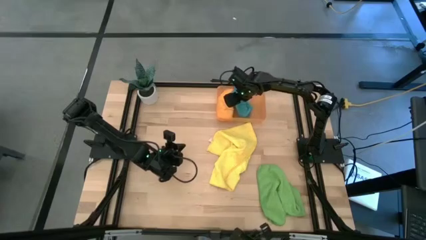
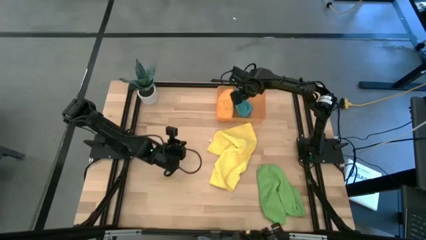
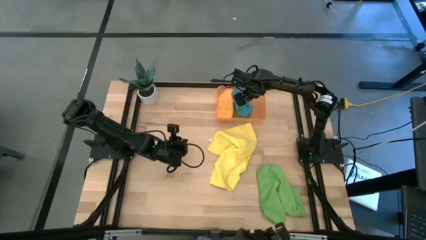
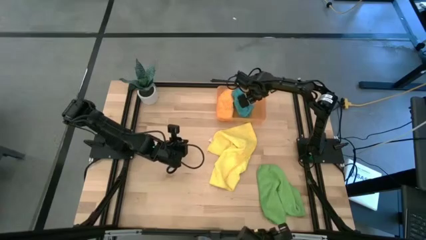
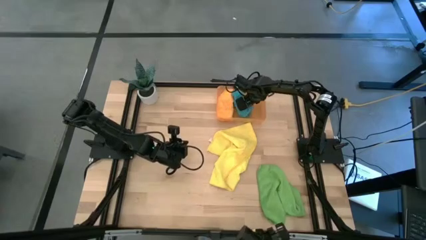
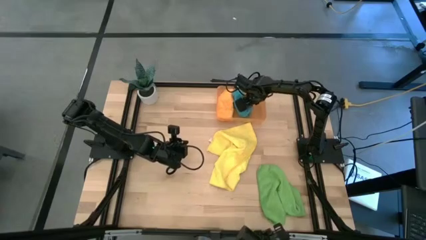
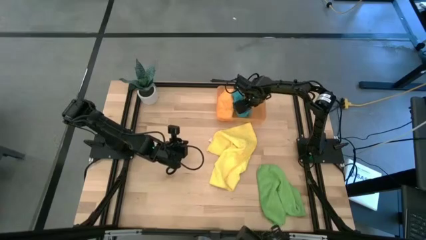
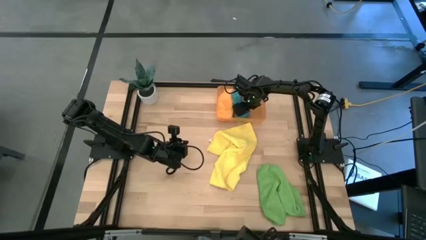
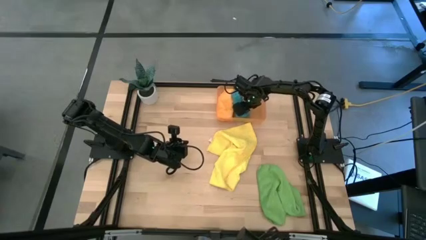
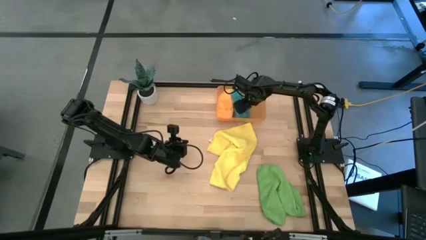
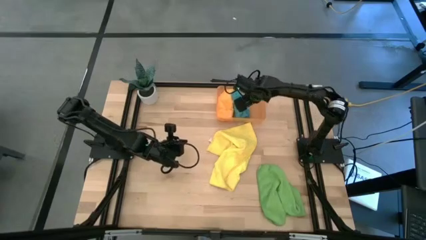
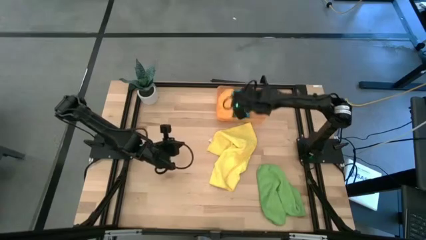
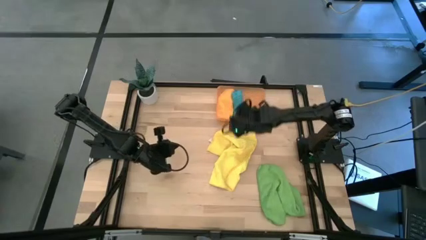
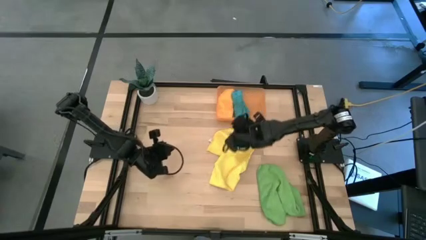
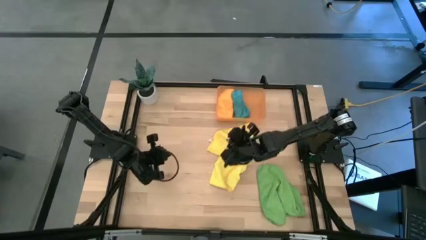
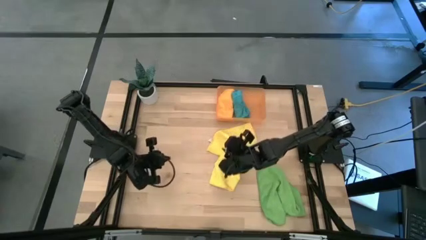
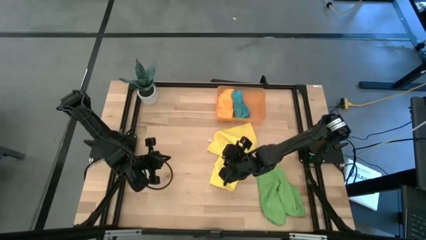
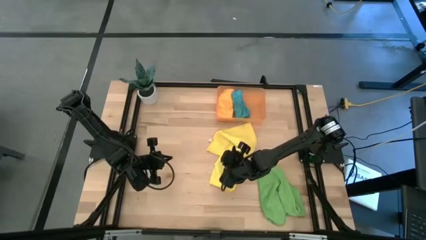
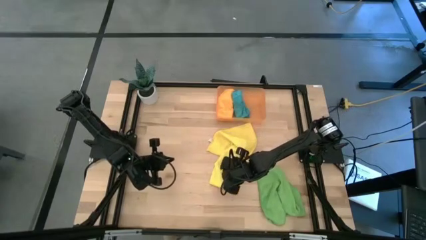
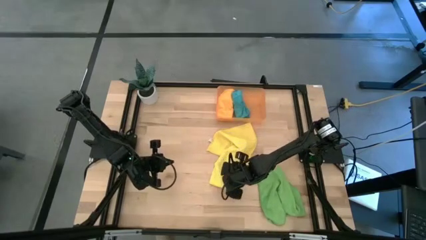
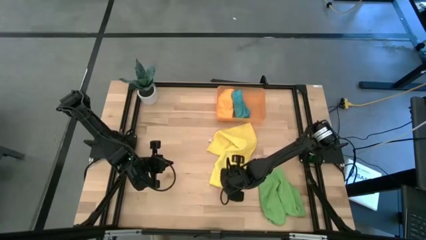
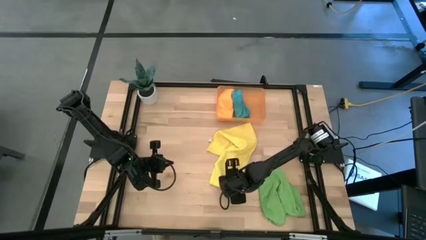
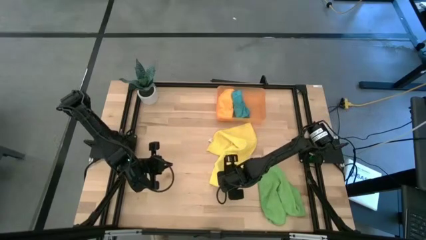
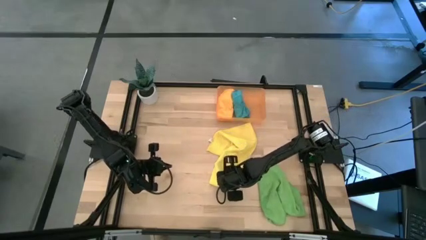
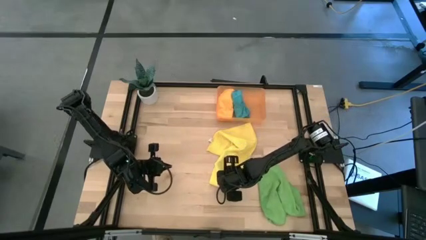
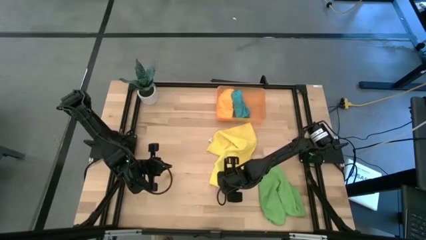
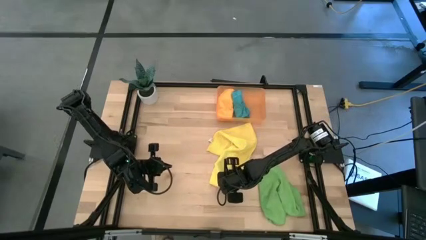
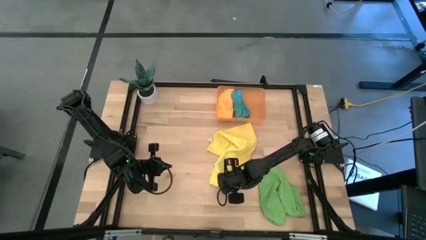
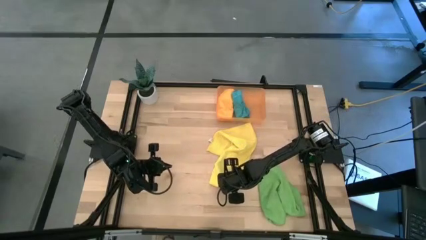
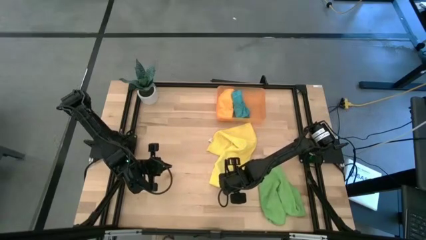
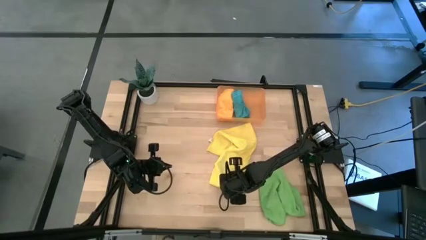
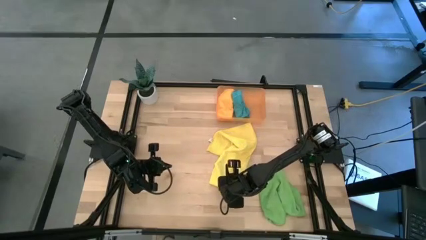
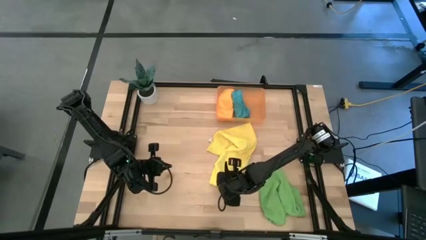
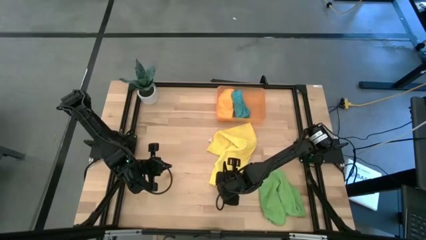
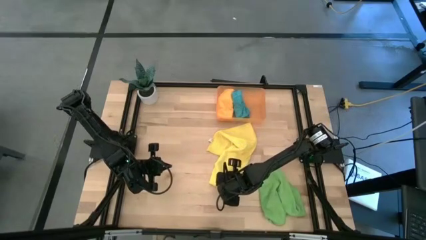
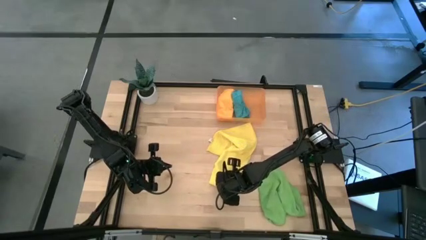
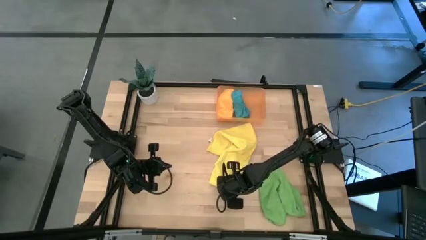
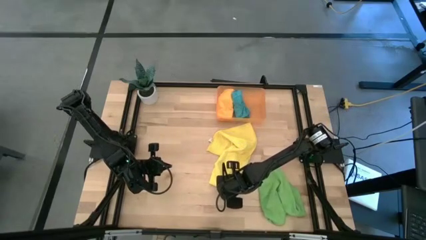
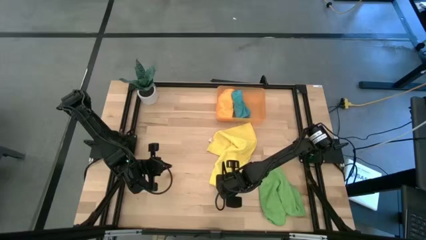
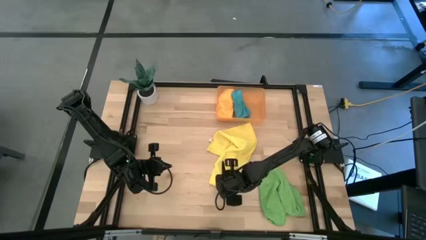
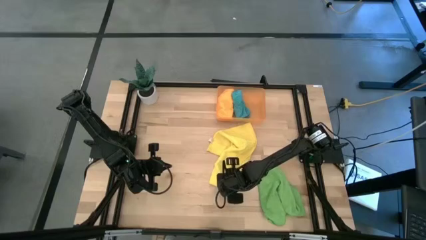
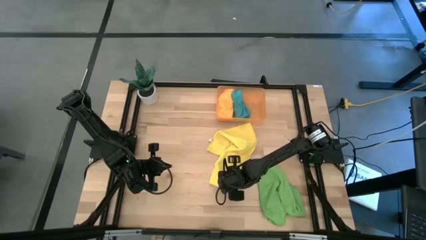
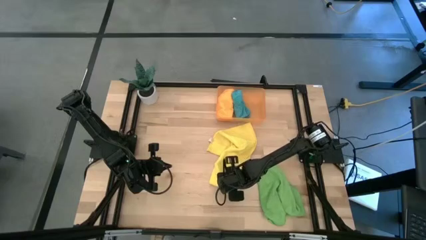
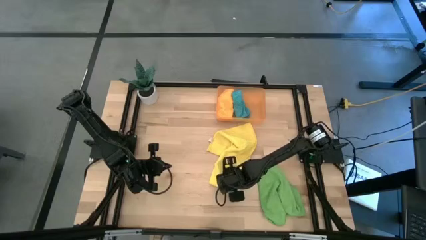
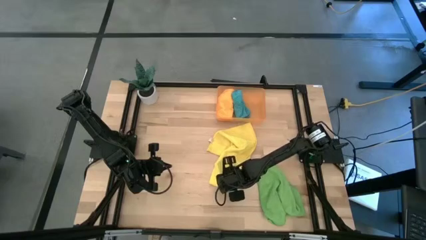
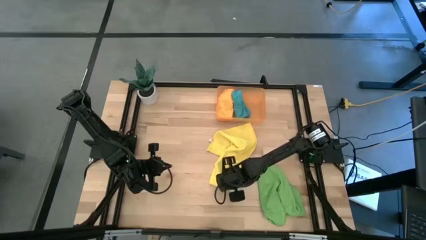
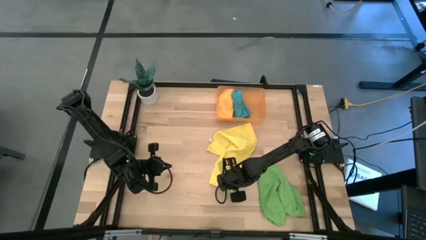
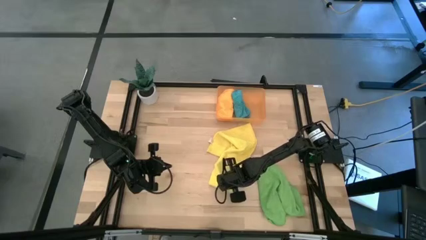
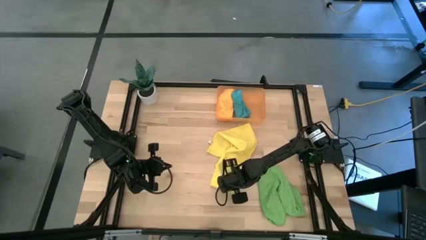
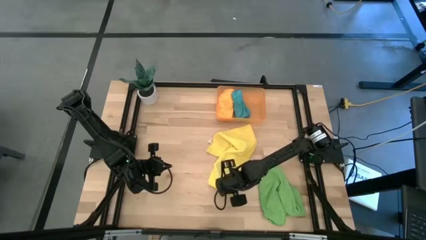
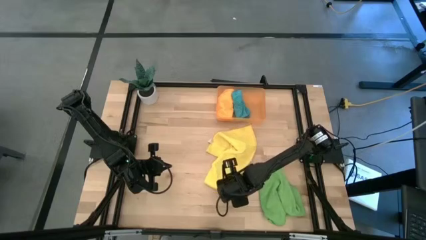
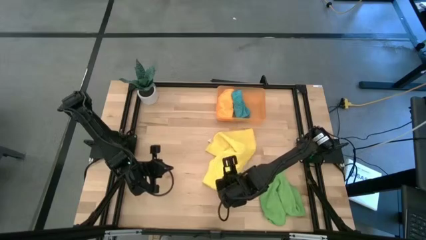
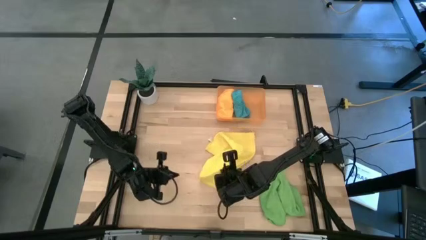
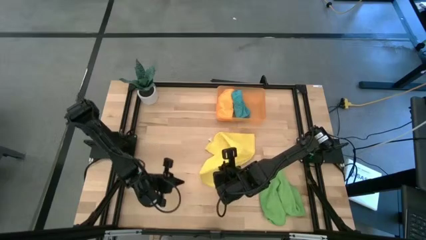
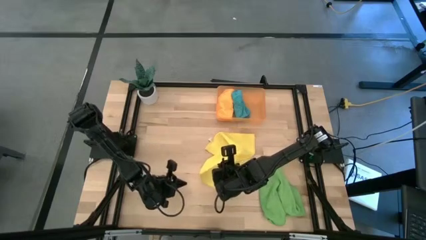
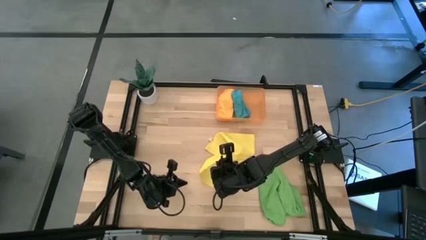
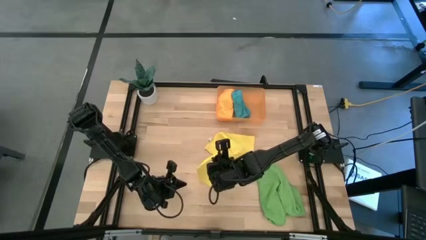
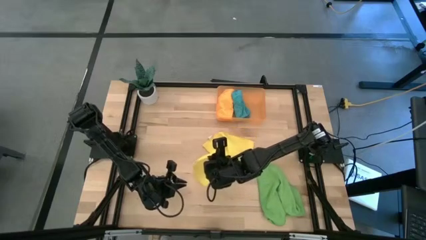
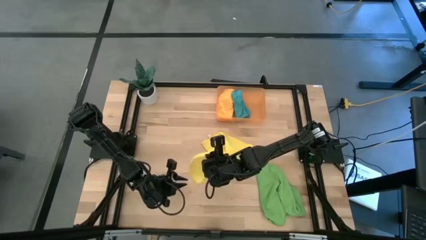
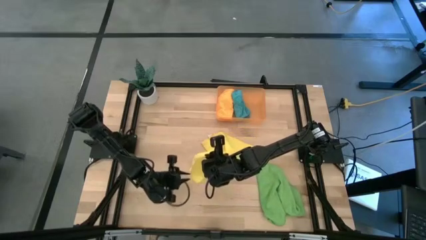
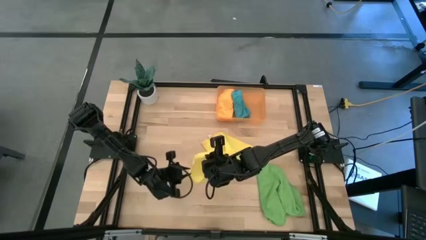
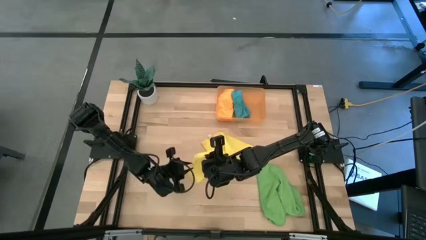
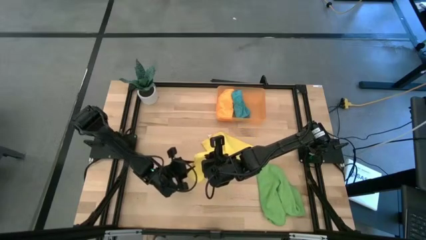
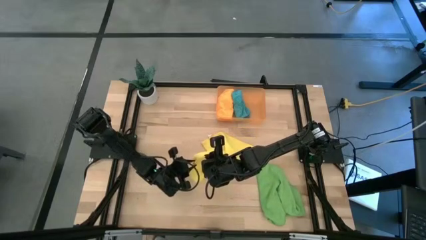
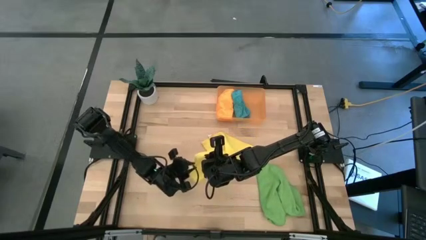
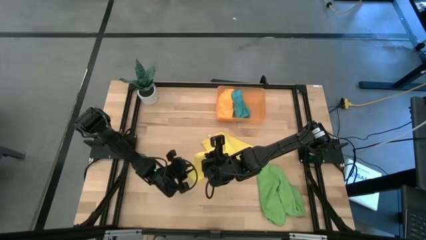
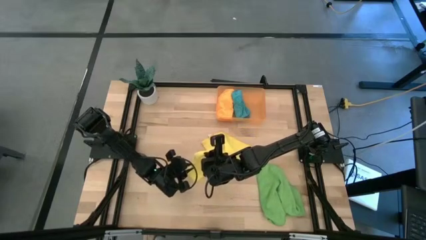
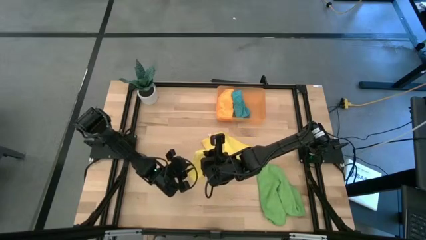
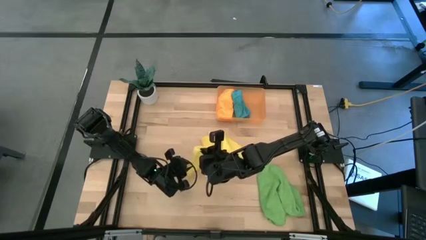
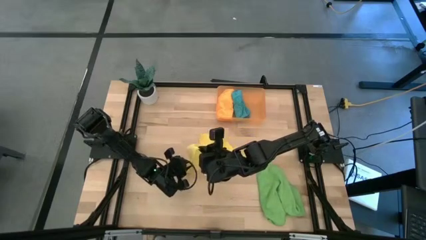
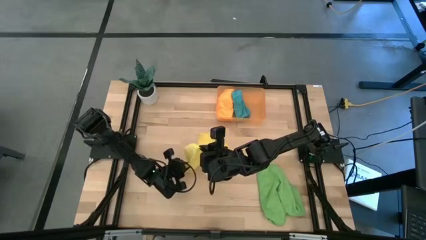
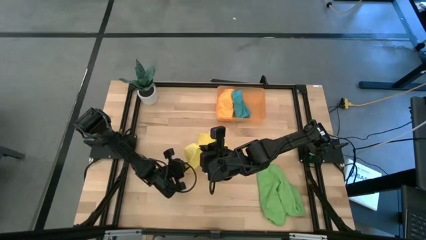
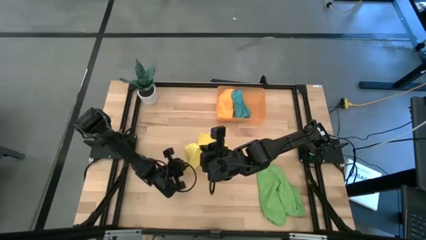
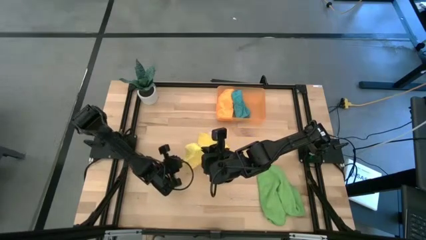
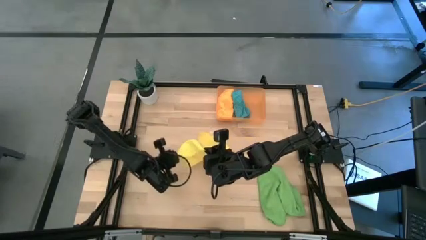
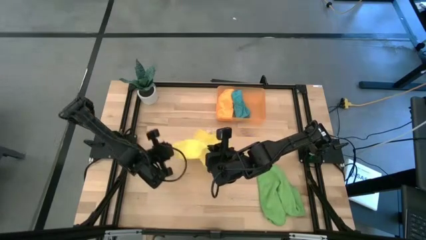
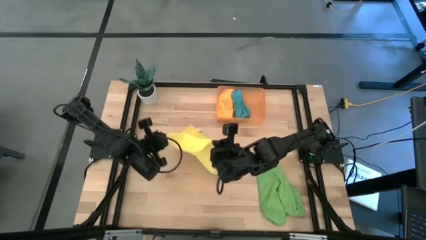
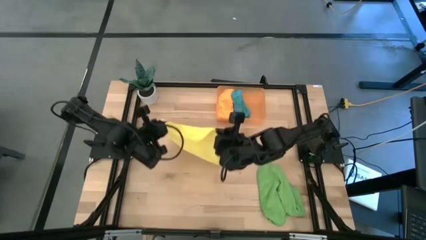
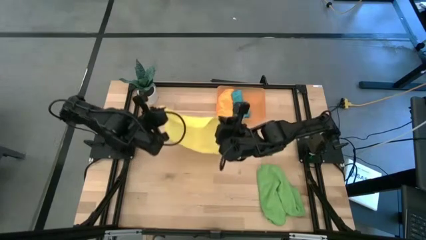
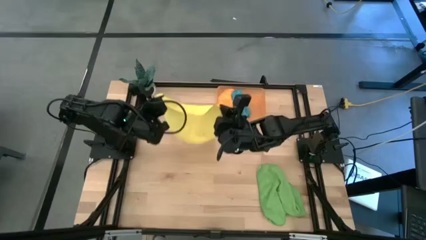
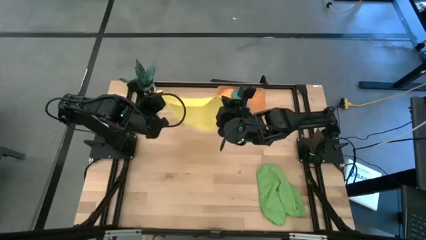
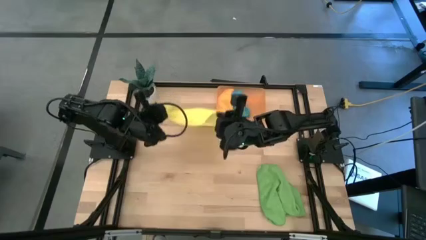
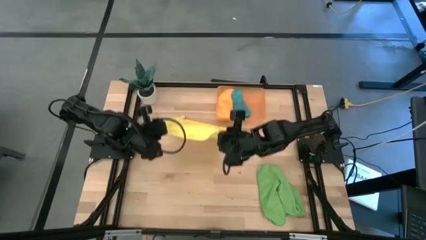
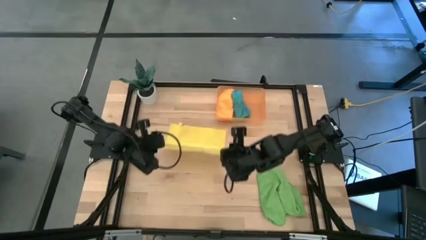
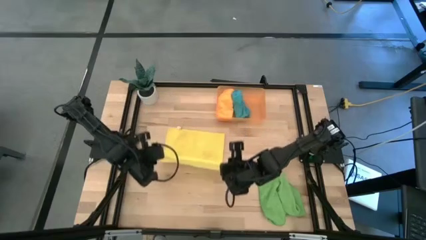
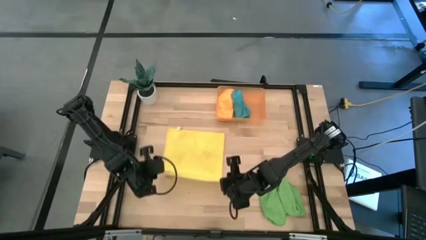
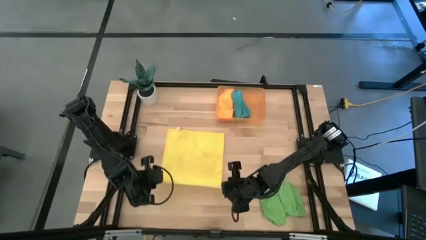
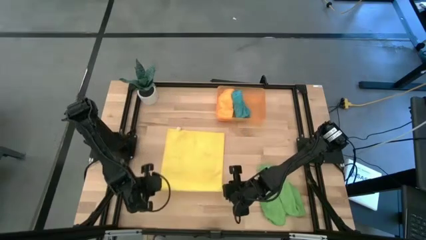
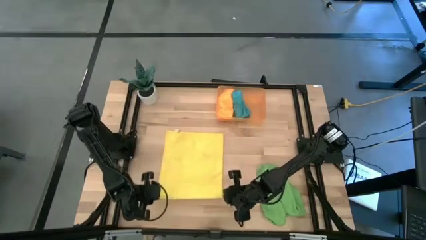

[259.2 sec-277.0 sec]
Task: Roll microfiber towels into tight, uniform cylinder then place into a basket
Roll the yellow microfiber towel
